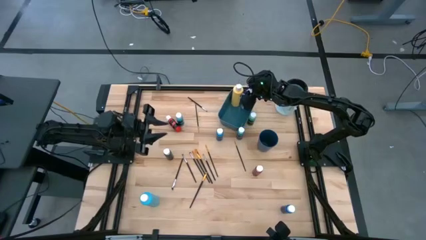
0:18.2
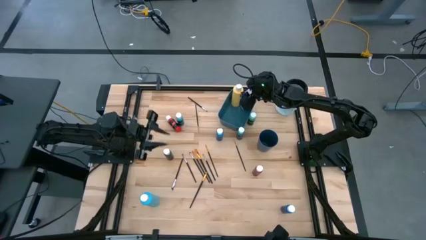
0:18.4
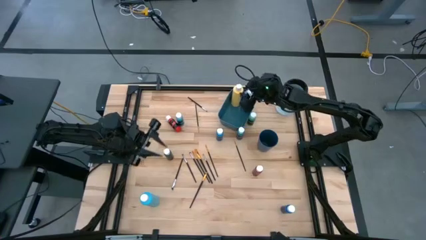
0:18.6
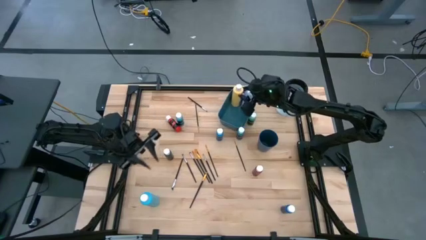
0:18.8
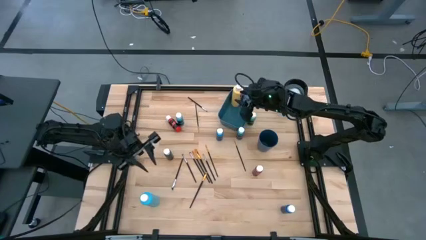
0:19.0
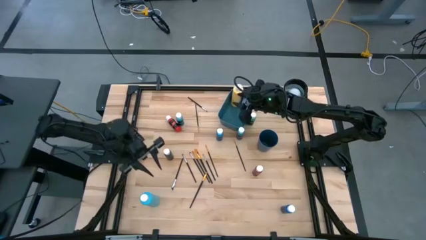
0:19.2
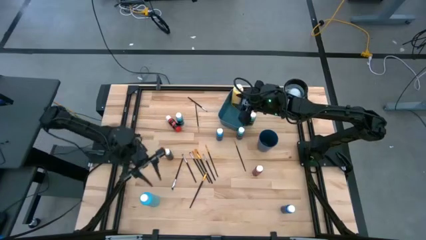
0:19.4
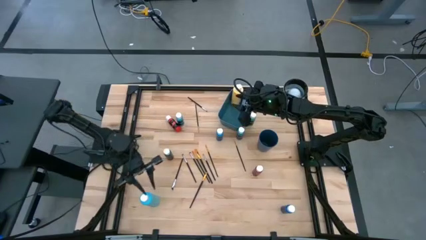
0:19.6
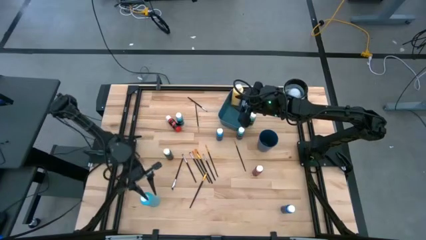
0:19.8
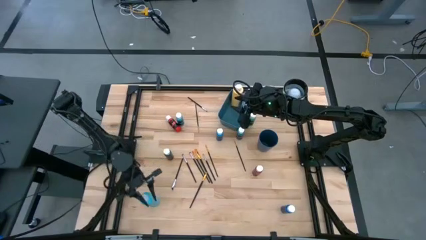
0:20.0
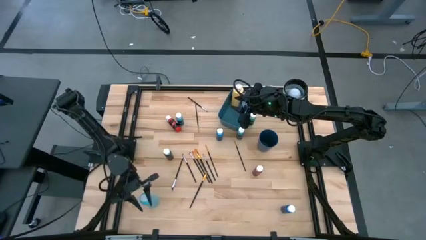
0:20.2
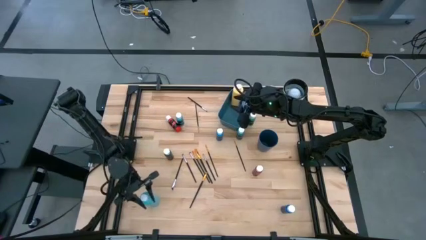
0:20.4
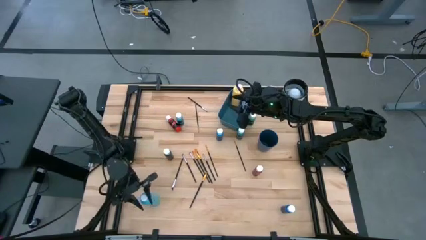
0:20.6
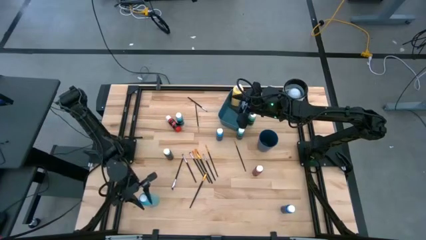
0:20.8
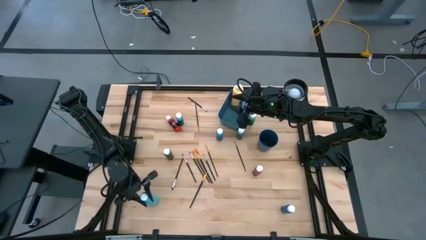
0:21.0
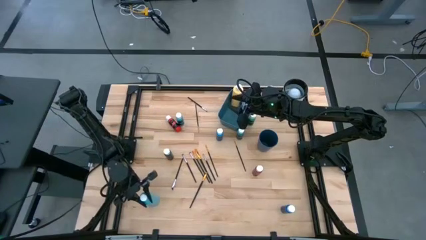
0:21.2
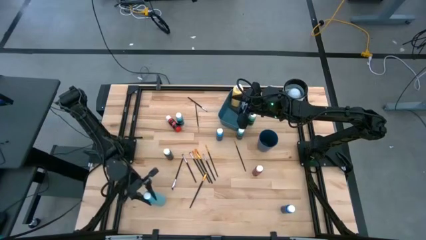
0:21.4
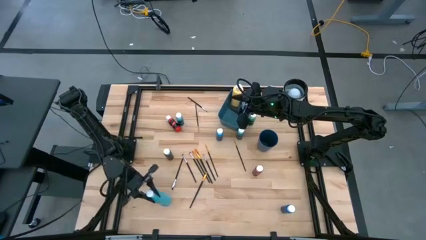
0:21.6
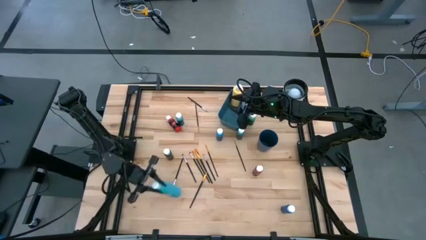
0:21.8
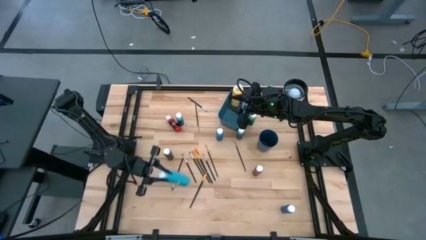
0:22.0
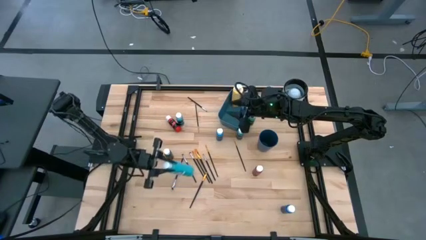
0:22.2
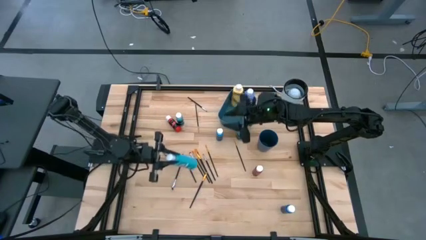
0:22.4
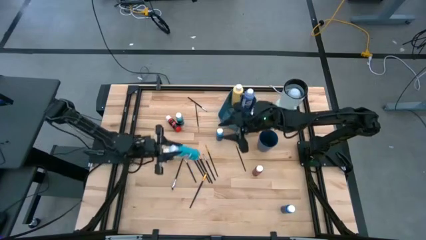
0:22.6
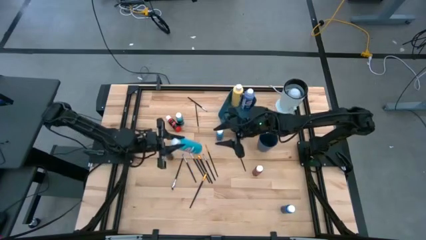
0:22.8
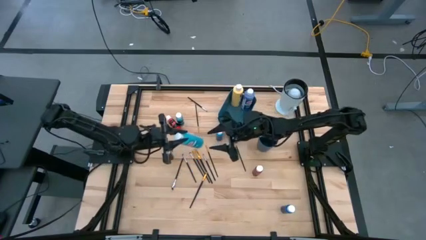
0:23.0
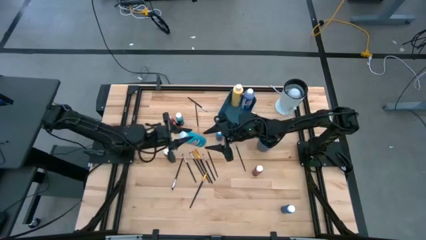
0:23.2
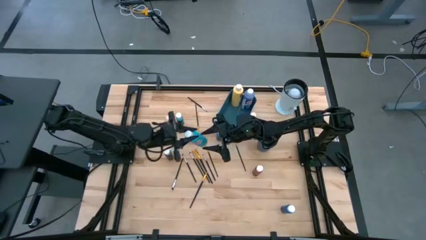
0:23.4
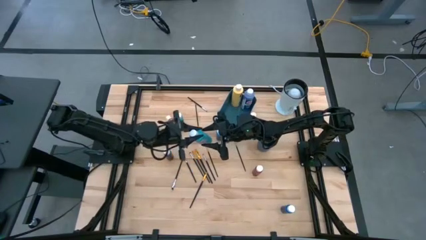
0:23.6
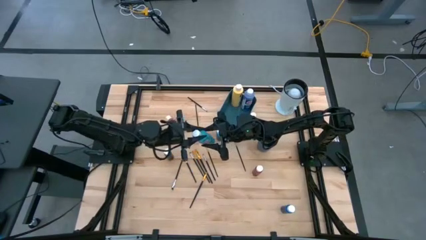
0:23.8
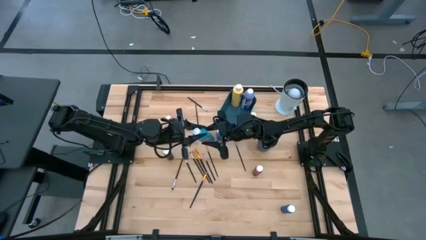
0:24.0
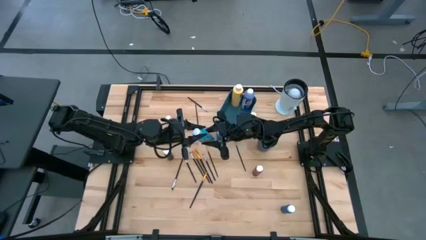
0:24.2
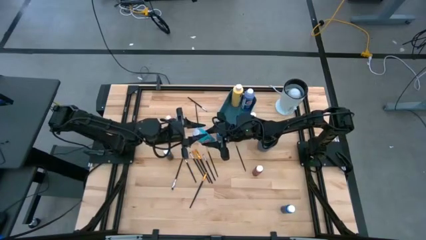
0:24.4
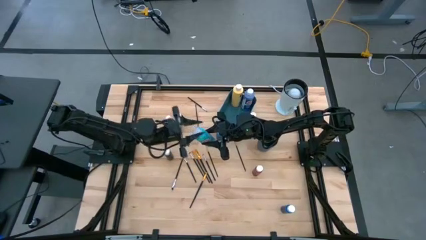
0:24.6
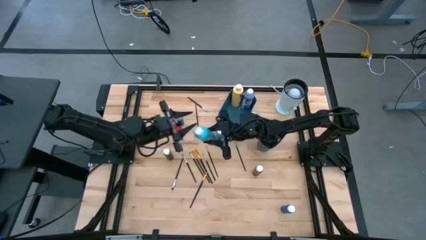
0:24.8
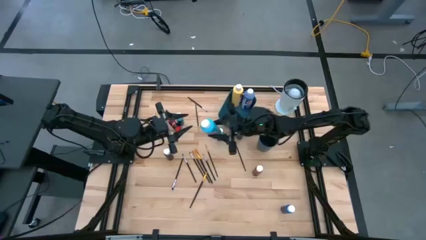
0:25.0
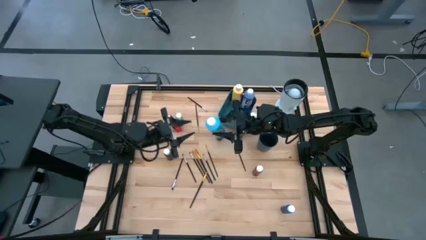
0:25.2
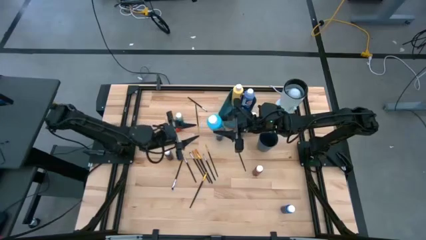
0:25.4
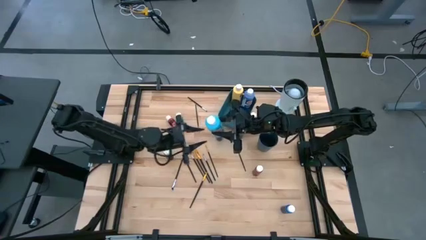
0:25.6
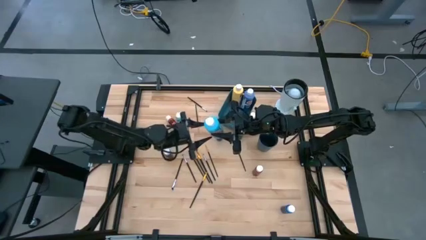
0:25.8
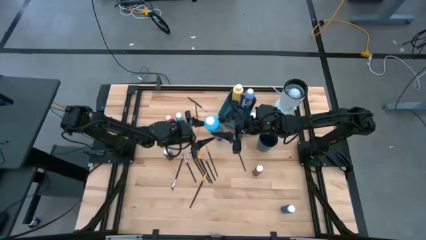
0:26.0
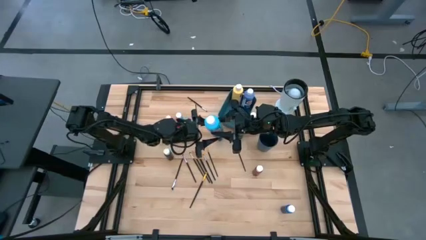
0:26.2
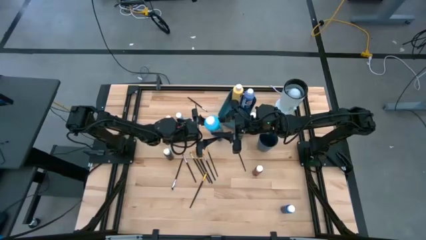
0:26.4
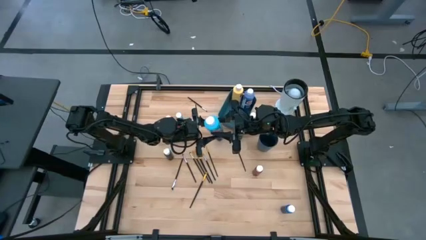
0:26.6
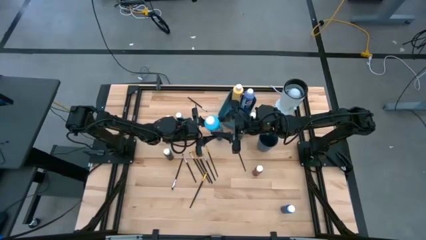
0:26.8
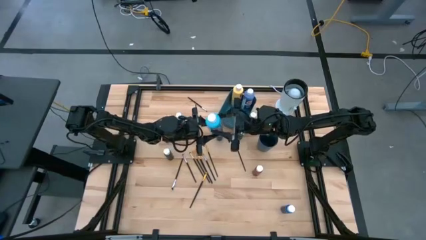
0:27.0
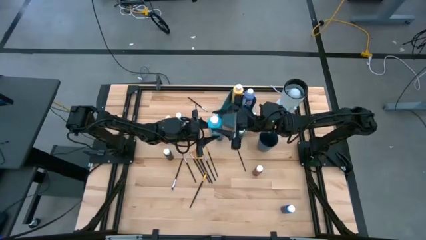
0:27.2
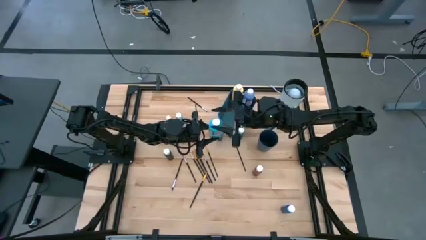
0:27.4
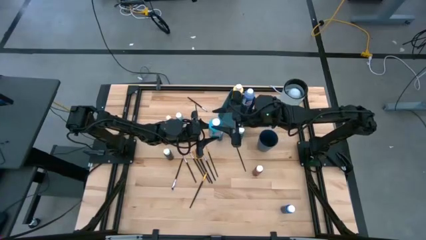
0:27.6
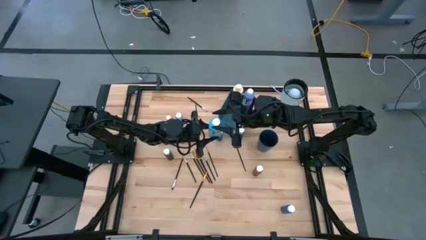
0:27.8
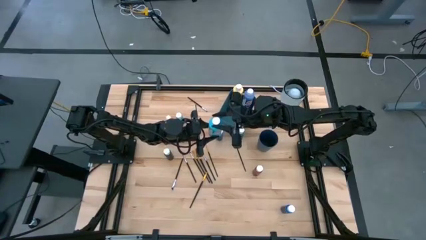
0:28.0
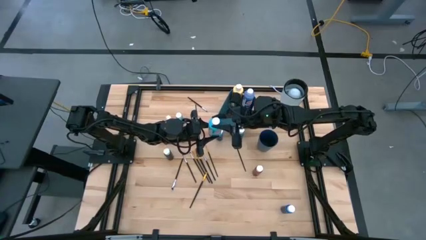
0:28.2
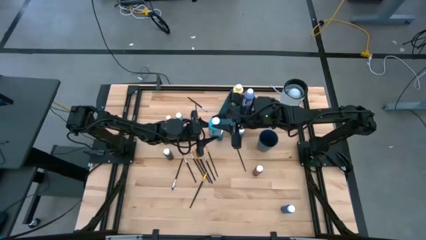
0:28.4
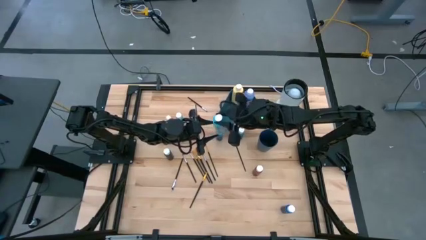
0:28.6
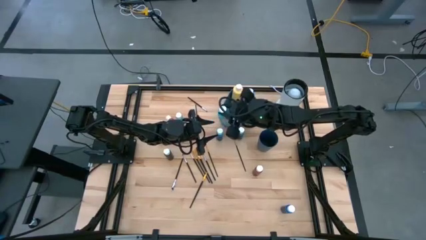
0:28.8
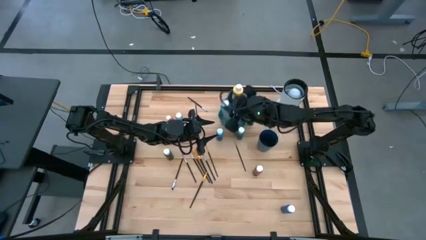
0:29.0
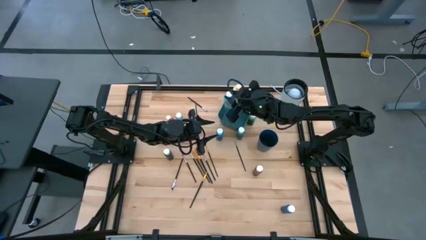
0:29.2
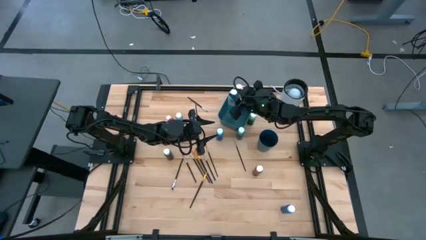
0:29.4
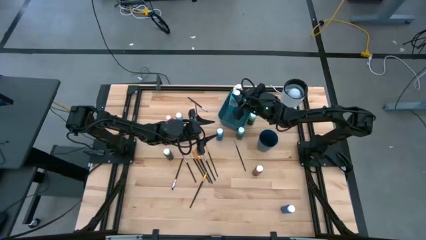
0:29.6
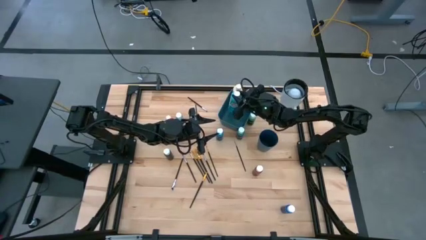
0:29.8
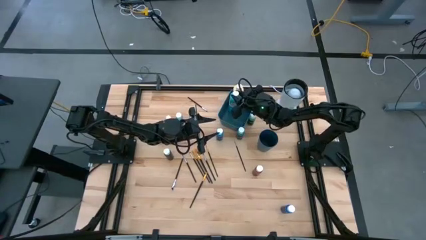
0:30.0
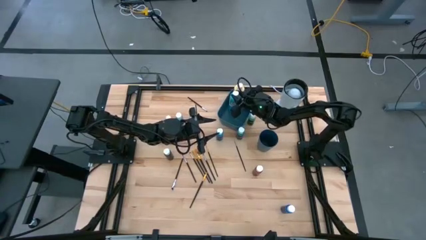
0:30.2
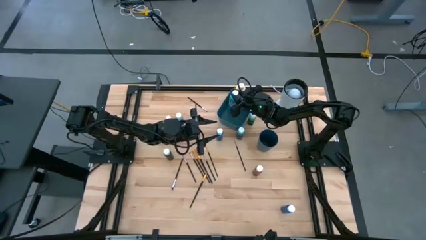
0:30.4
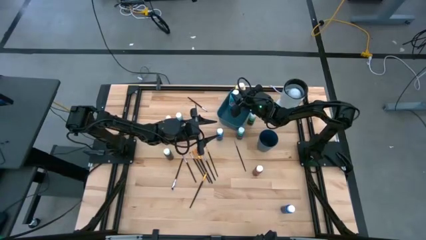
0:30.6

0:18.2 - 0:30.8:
Task: Pick & Place Paint Supplies
Put the blue paint bottle into the blue bin

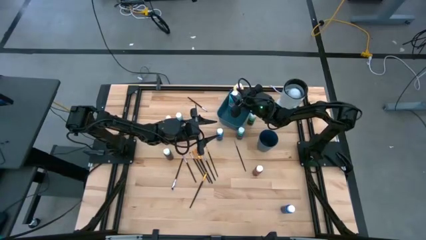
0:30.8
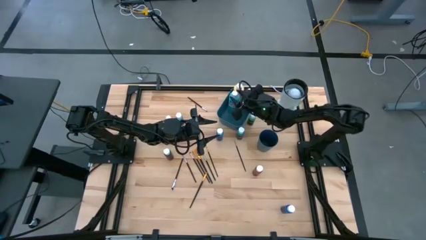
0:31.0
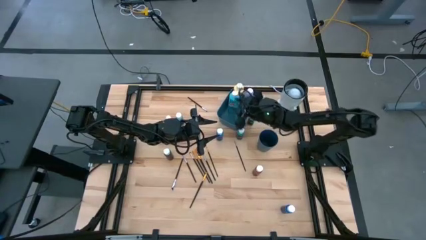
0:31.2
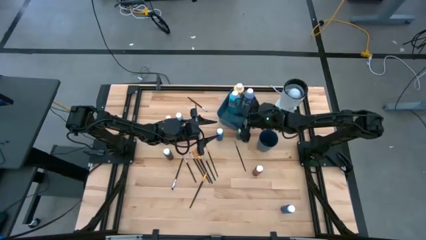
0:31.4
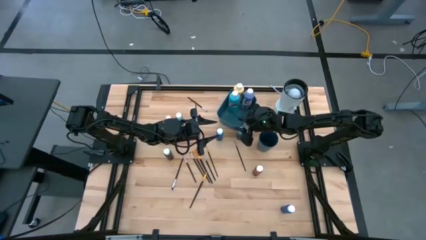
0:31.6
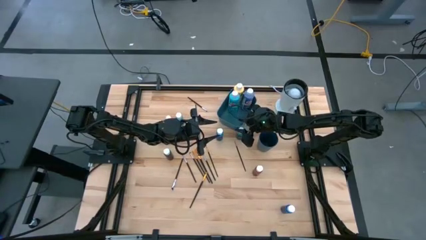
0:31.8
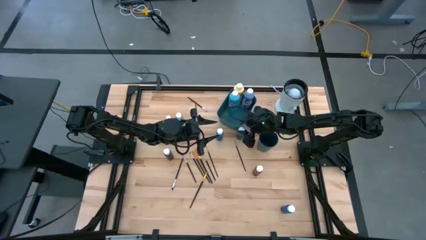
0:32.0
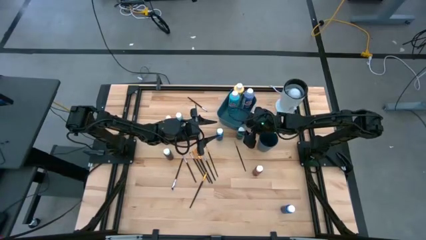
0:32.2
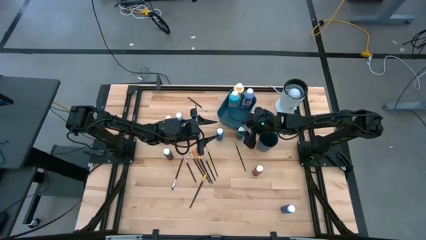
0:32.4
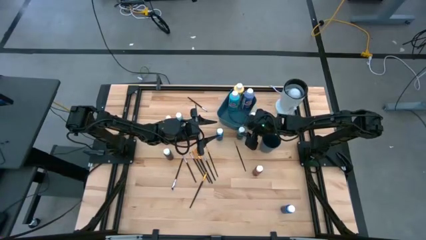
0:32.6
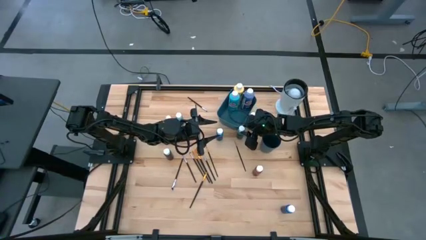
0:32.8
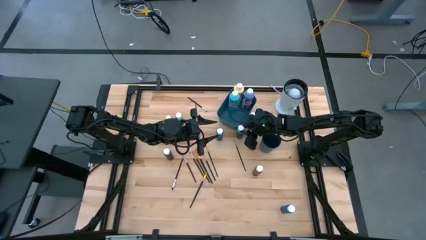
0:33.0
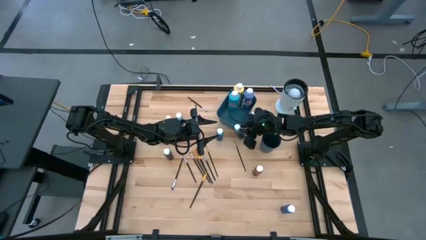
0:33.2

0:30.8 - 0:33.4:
Put the dark green paint bottle into the blue bin

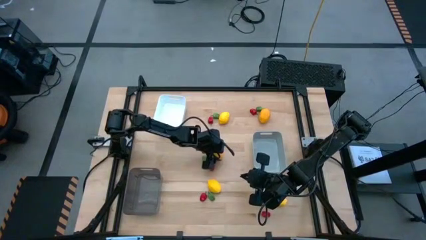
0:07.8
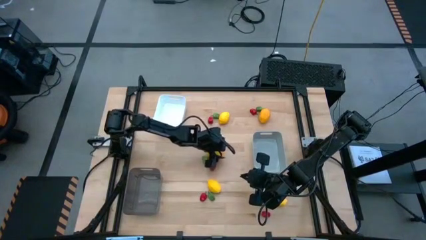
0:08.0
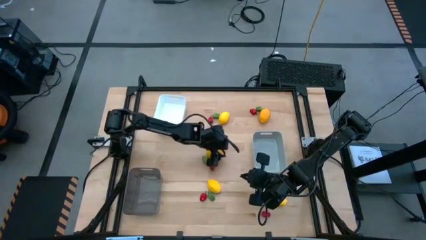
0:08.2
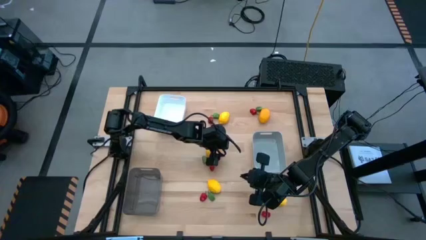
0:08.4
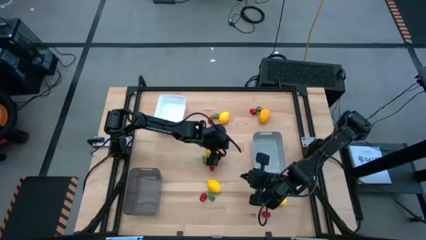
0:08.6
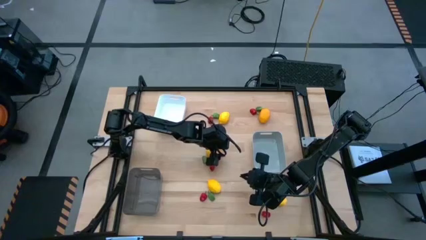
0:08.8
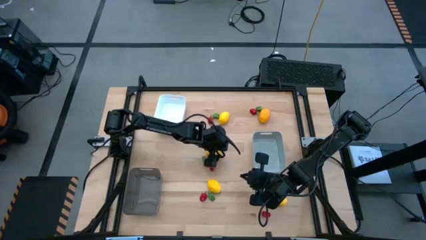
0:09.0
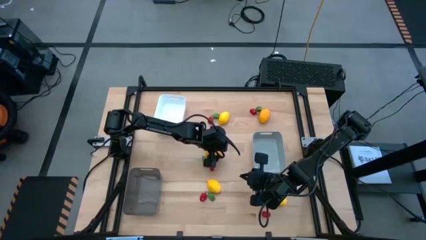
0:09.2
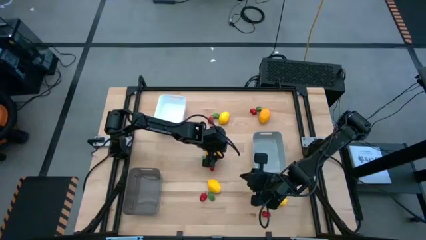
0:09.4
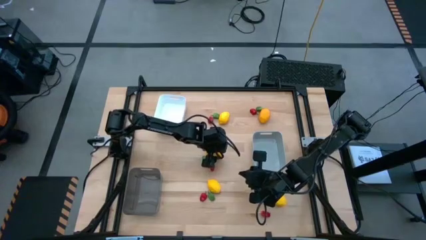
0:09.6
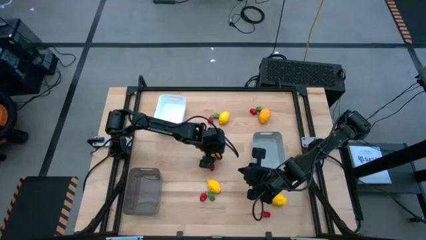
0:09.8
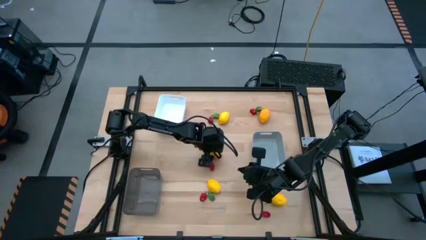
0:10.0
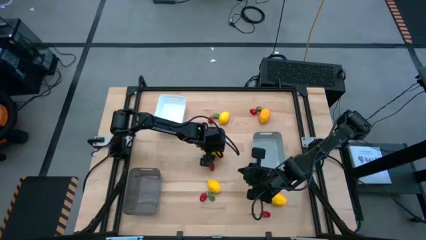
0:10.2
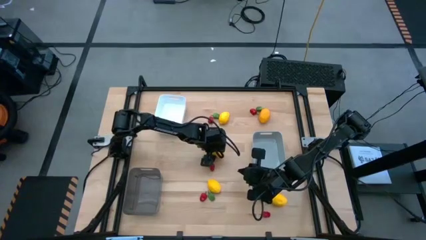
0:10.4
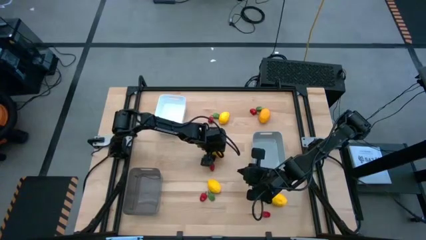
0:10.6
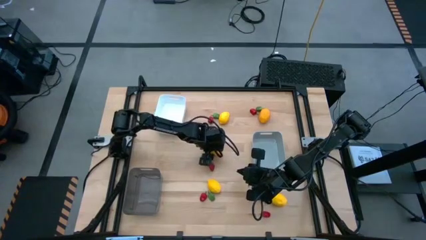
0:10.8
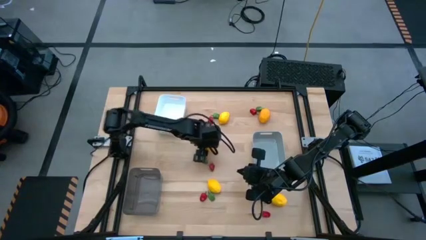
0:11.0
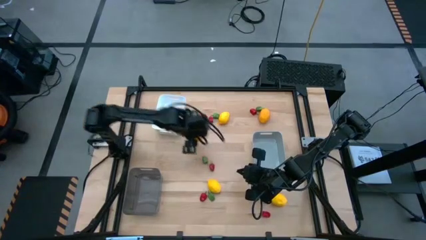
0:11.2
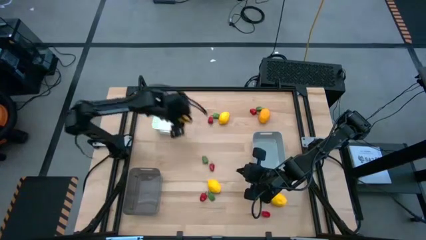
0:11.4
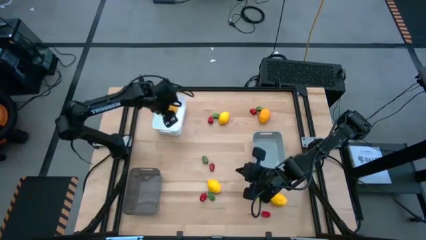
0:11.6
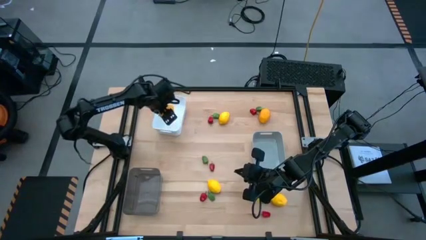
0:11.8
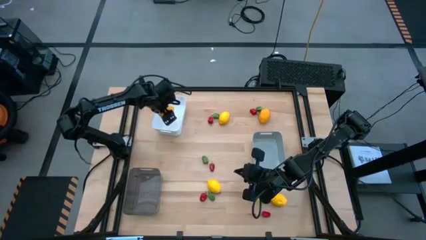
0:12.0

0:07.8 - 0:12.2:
Task: Sort produce into baskets
Put the middle left yellow lemon into the white bin
